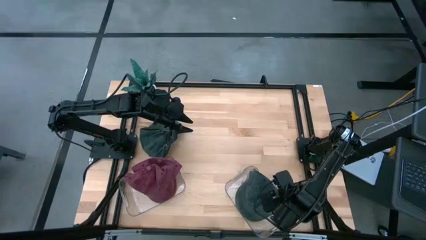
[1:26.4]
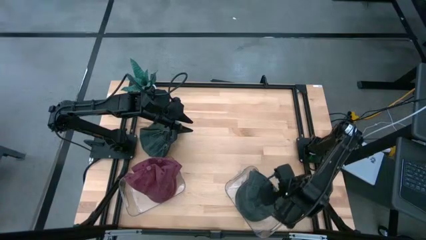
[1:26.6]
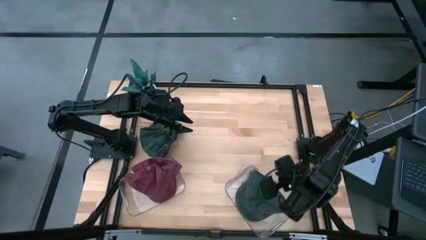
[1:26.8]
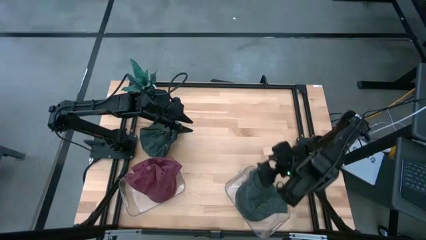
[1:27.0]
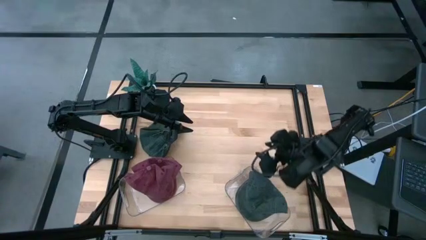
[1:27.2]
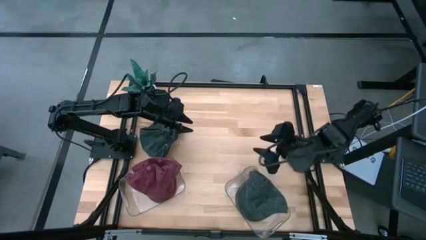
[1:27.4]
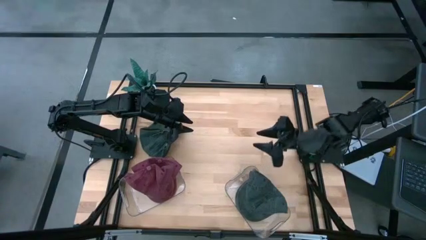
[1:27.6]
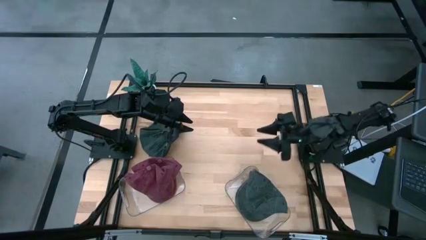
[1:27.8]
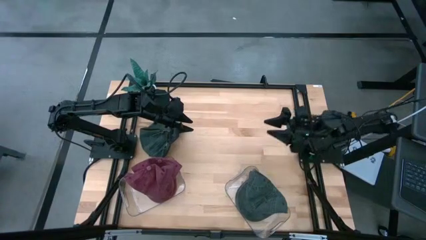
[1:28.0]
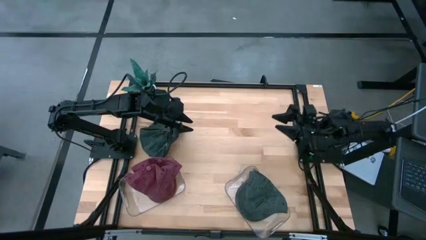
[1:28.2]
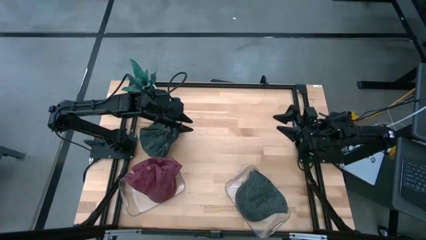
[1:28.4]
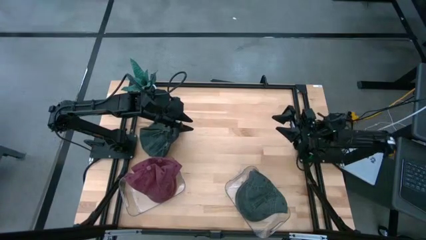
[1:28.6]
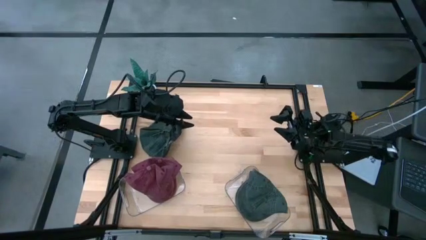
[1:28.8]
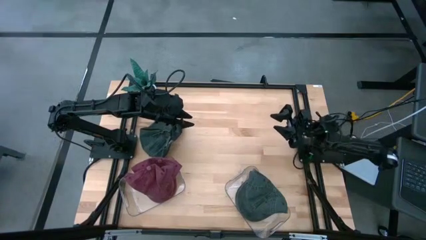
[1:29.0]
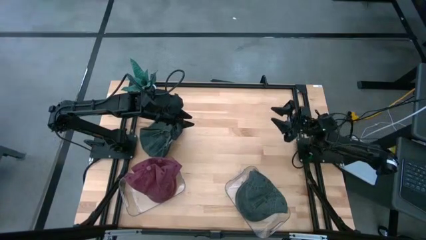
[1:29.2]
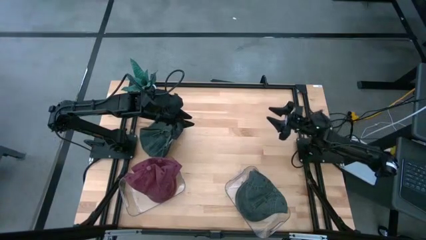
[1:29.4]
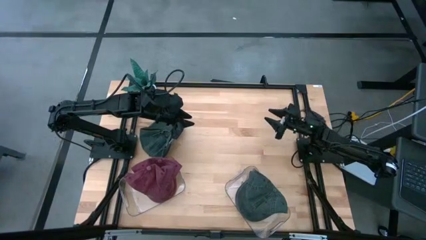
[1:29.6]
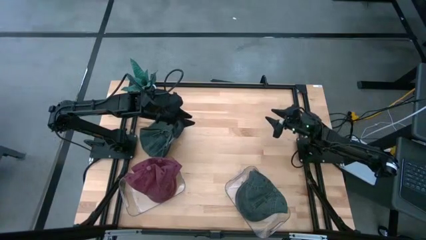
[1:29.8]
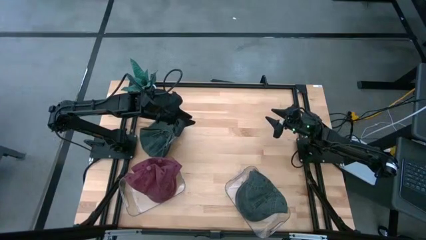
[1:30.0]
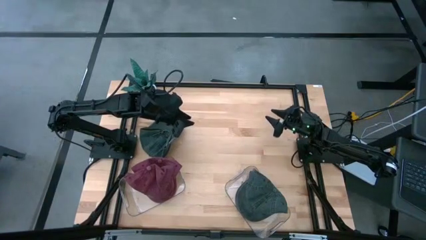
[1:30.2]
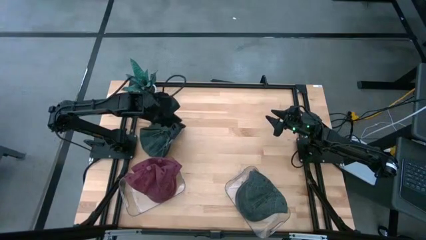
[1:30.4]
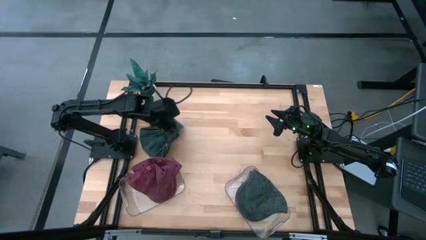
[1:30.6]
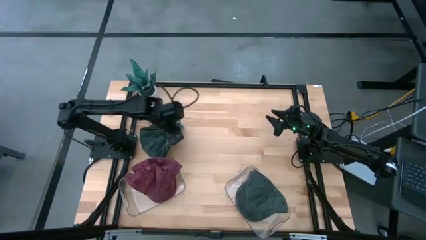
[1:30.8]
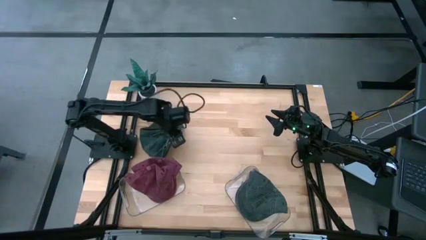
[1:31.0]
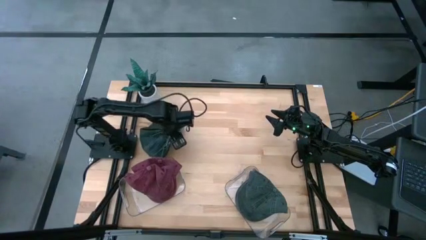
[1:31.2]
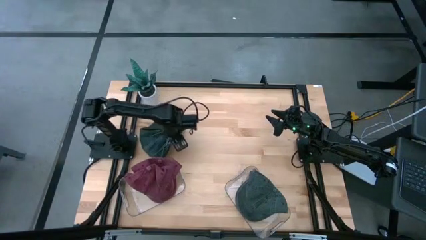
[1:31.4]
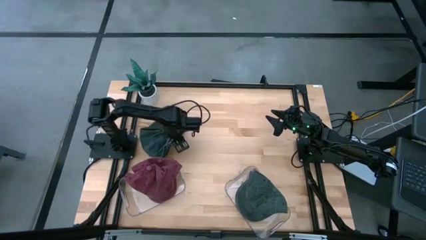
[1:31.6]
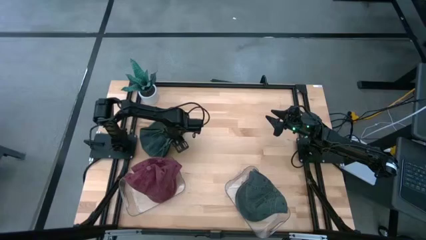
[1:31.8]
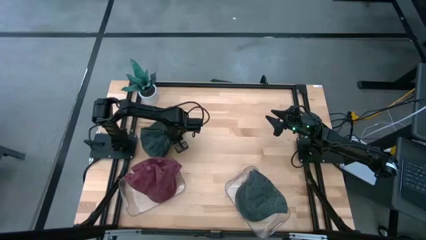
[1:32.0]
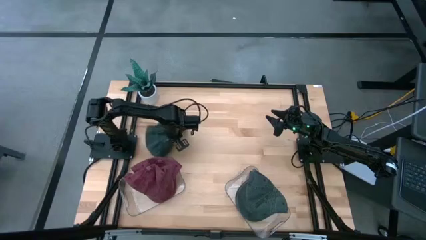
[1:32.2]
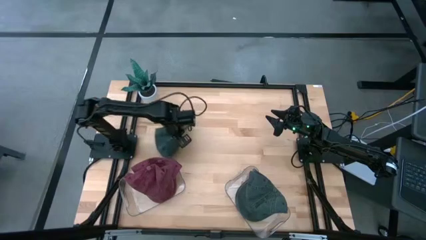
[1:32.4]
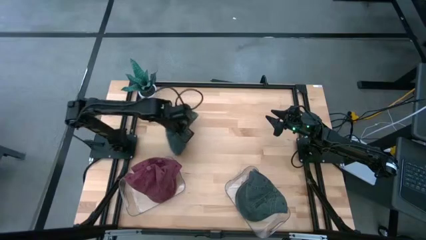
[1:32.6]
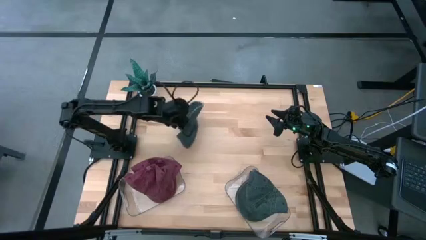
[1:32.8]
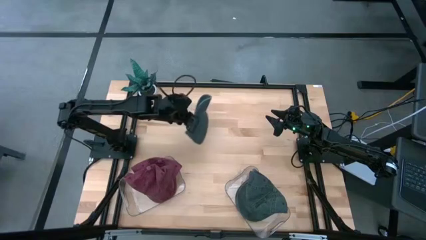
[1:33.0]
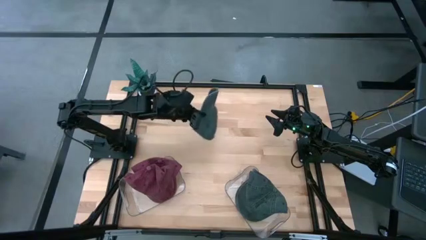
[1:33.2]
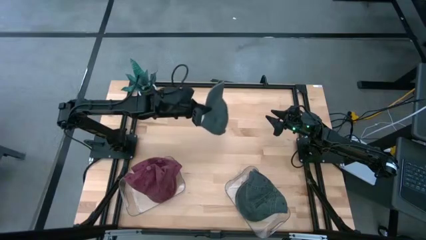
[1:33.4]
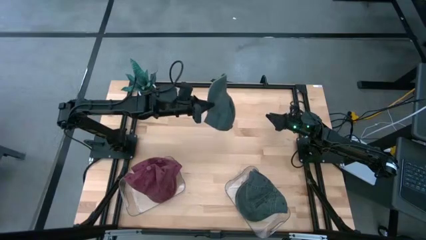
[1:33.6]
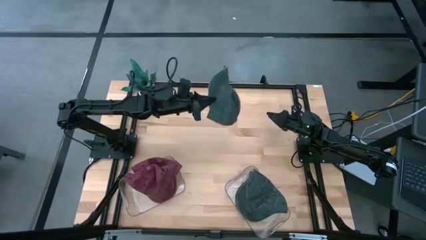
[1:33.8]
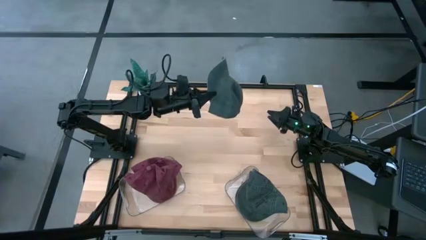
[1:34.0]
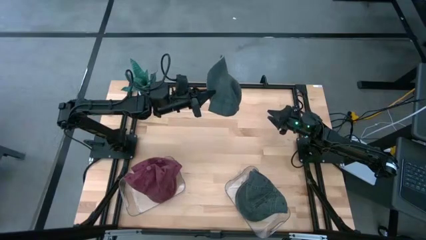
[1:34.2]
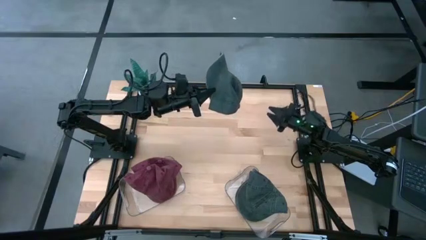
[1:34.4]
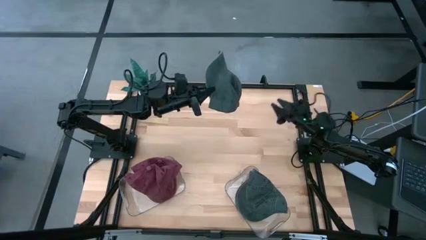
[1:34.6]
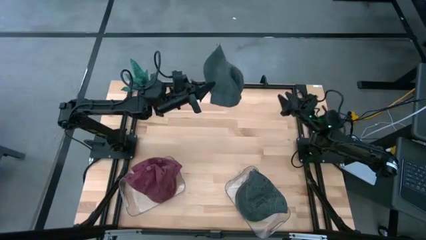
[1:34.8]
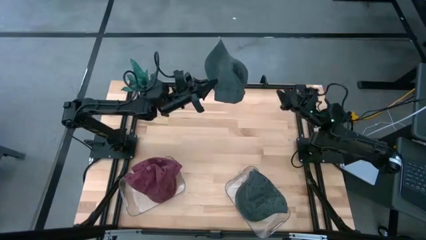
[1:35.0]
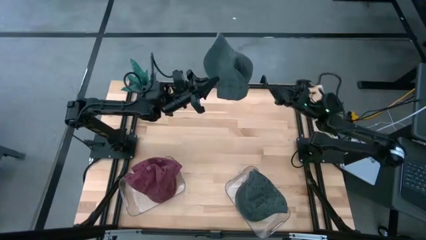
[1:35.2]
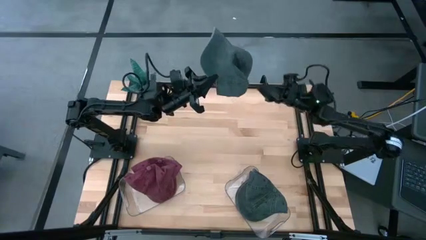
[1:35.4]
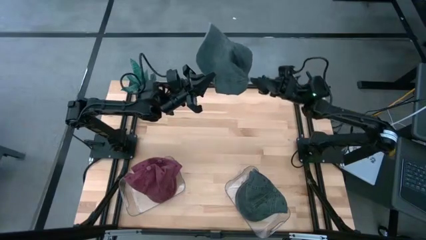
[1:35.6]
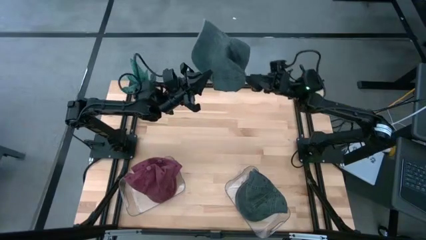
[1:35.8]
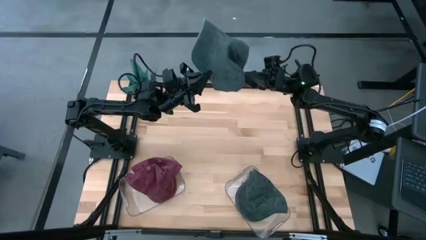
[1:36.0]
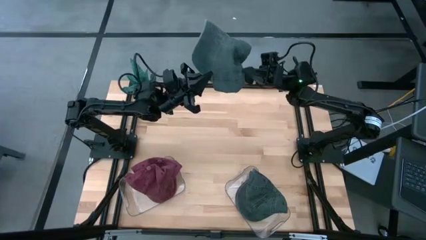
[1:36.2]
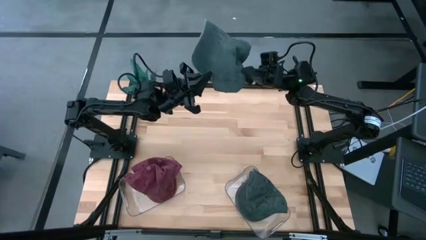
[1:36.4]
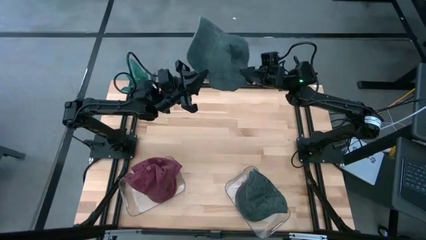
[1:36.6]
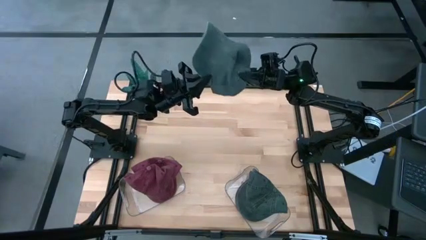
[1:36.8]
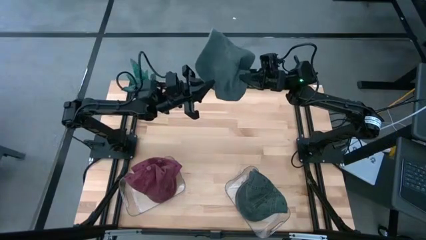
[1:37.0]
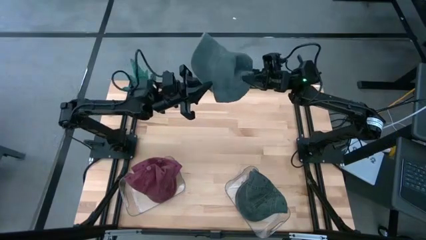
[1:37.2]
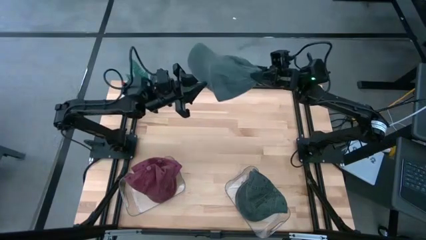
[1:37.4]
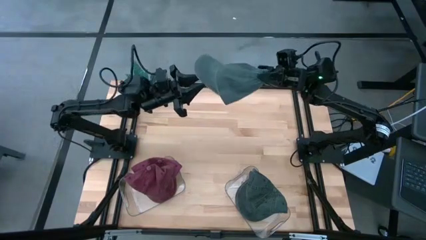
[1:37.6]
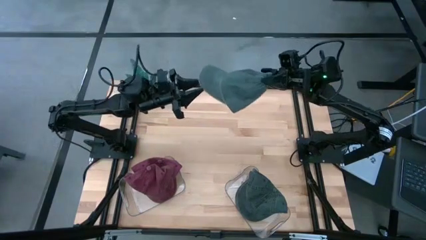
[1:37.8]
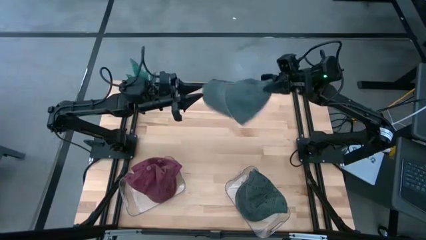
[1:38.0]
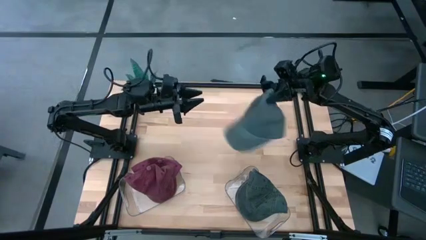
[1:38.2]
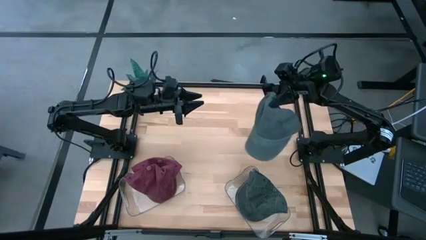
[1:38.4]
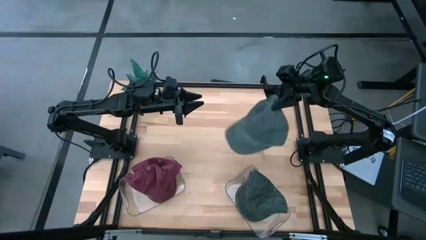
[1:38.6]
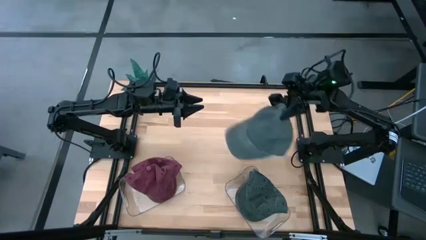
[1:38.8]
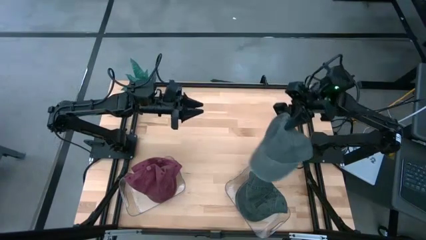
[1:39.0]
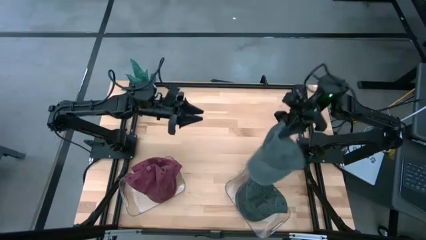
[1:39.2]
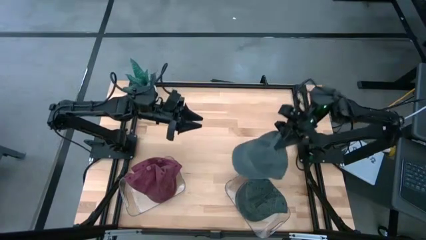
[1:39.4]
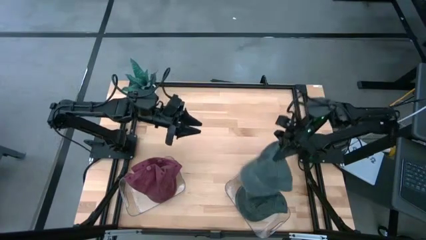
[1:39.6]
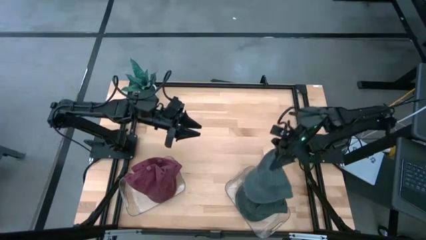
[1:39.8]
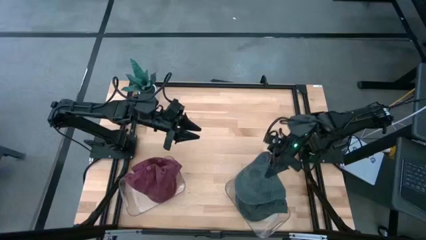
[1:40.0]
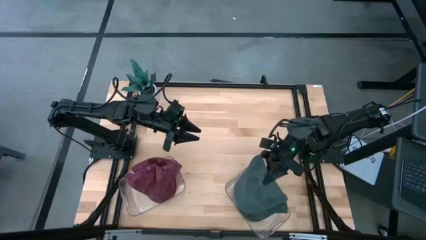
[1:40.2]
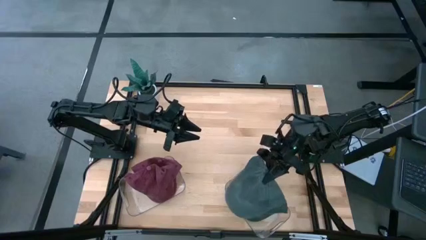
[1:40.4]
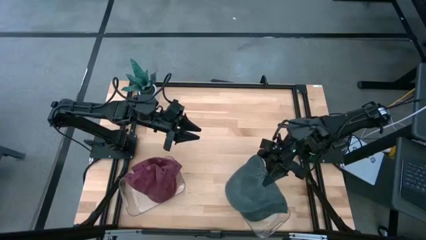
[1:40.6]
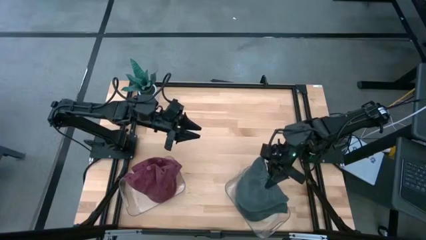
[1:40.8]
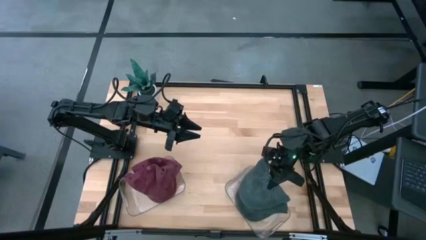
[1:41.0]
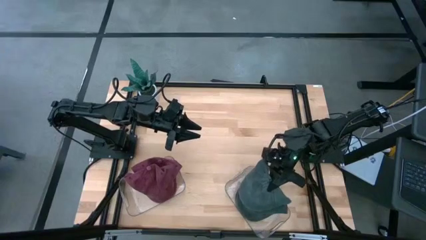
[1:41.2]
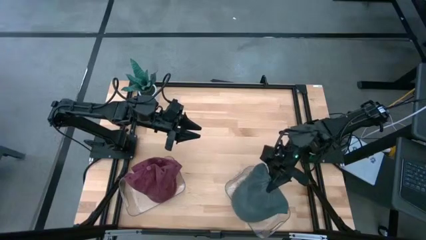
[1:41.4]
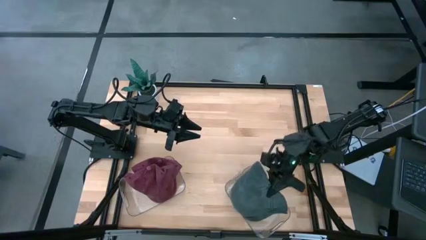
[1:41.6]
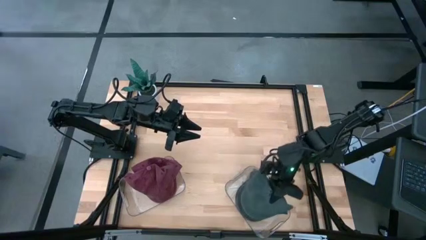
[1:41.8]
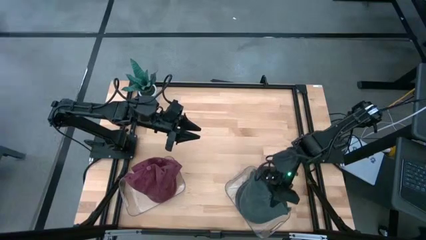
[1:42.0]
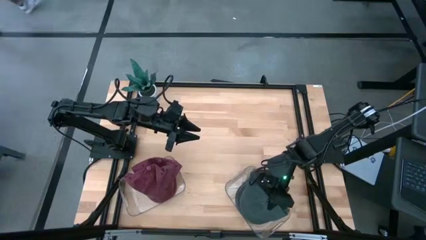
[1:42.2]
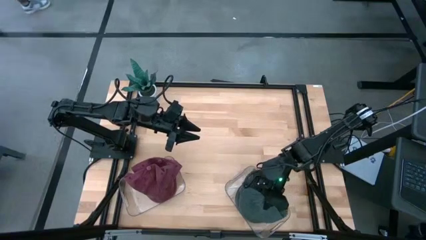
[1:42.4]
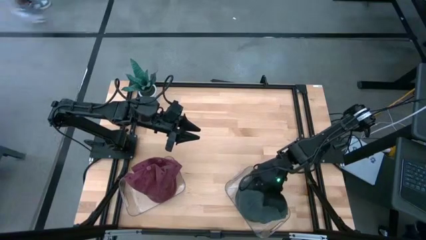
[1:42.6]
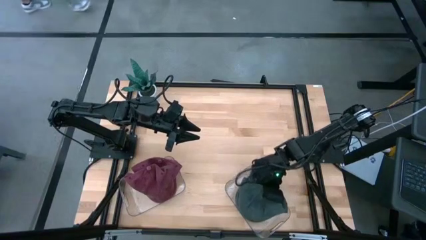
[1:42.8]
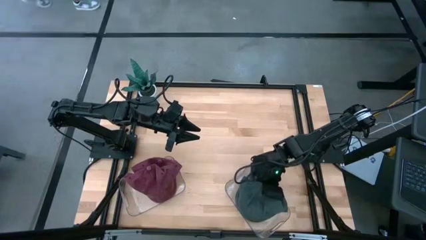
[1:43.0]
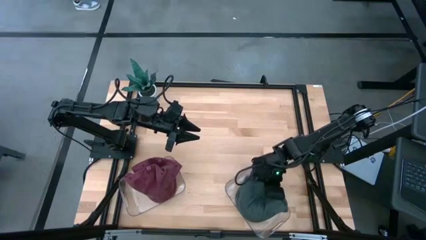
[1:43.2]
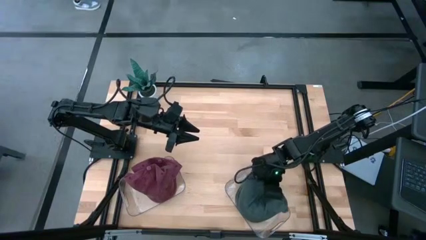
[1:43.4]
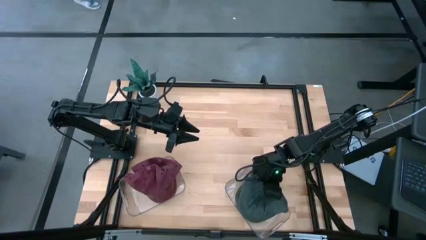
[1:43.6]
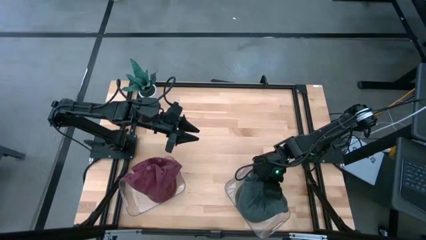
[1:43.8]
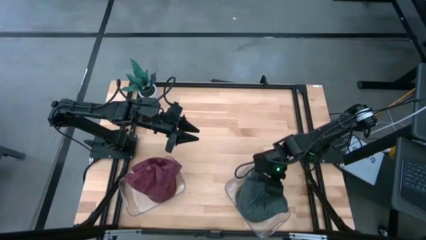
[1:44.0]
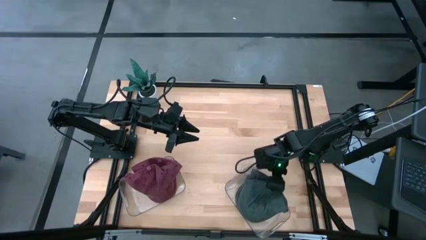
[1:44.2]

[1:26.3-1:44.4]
Task: Pick & Place hat
Put the black cap into the right transparent bin
